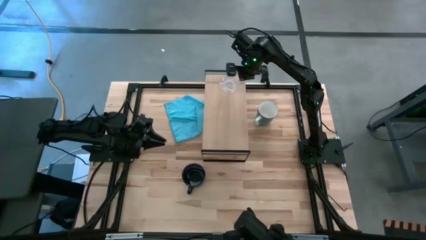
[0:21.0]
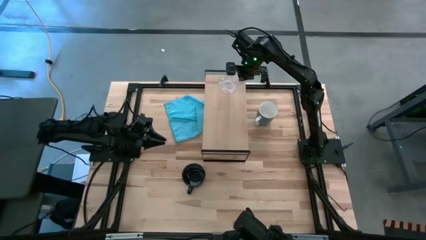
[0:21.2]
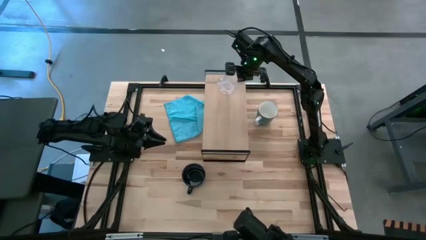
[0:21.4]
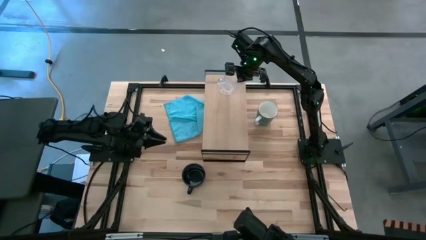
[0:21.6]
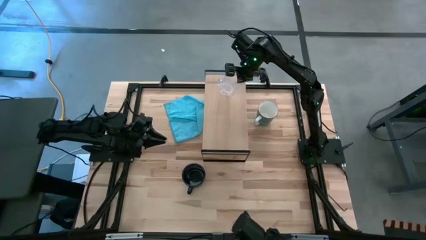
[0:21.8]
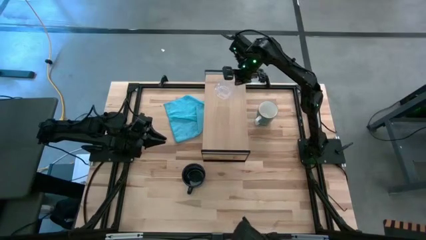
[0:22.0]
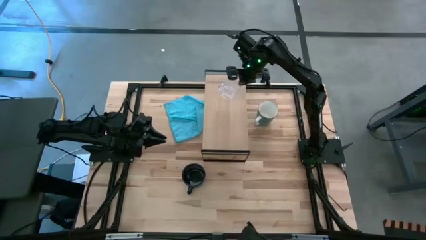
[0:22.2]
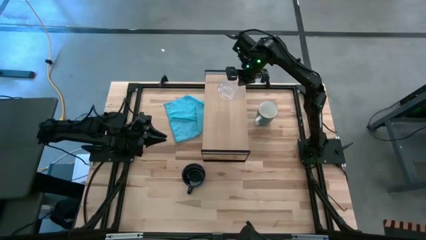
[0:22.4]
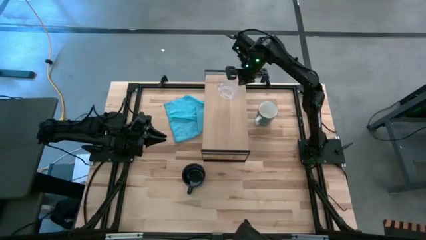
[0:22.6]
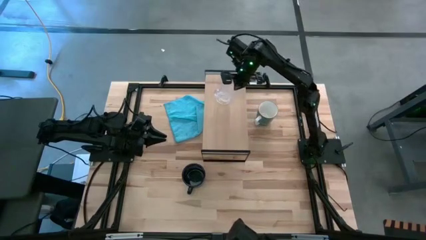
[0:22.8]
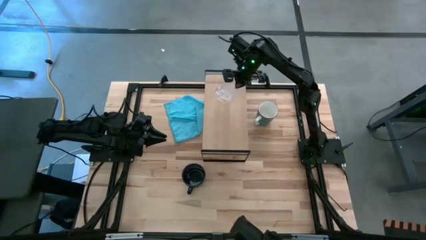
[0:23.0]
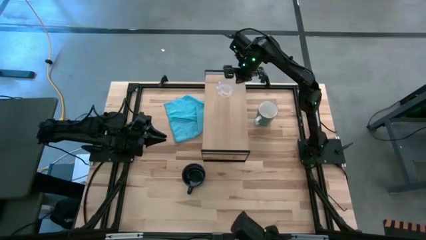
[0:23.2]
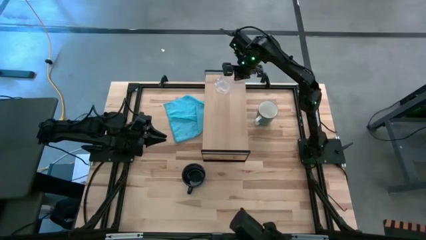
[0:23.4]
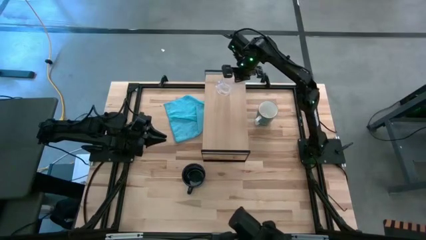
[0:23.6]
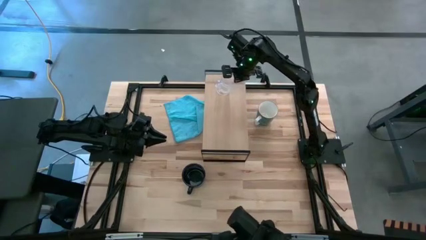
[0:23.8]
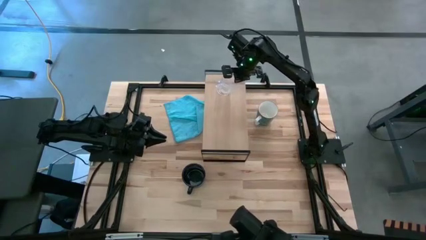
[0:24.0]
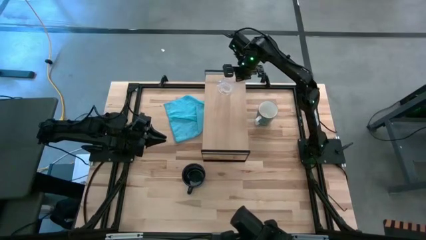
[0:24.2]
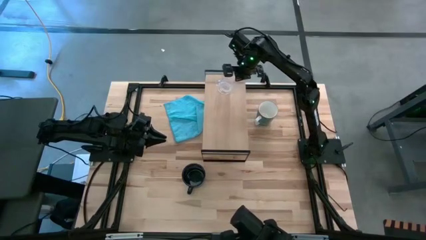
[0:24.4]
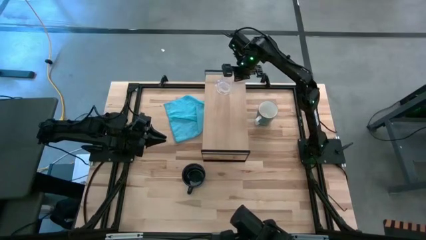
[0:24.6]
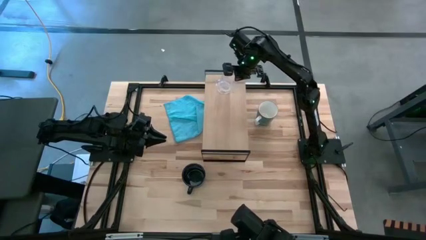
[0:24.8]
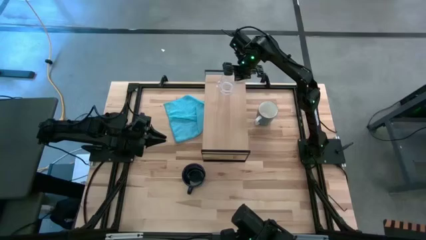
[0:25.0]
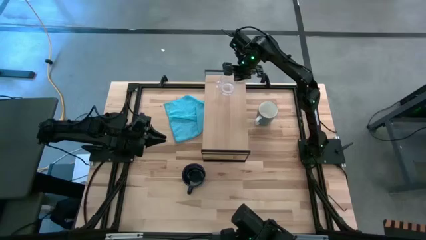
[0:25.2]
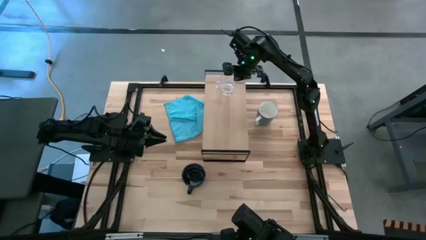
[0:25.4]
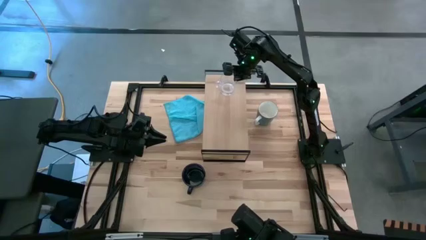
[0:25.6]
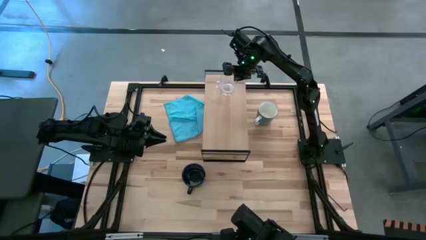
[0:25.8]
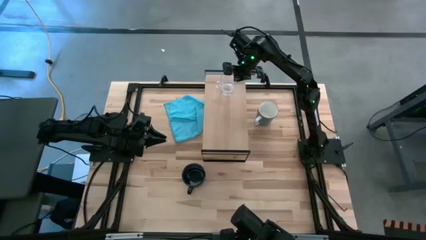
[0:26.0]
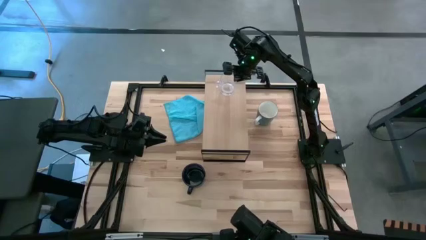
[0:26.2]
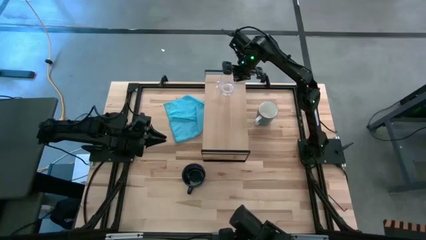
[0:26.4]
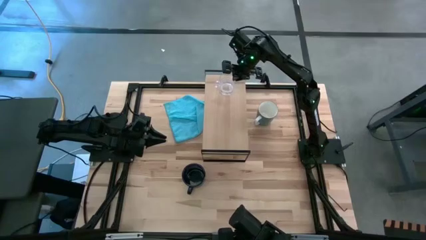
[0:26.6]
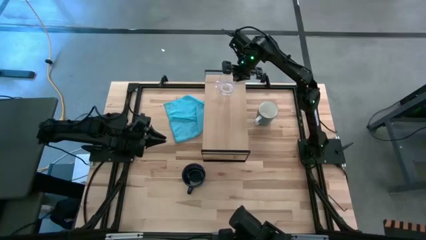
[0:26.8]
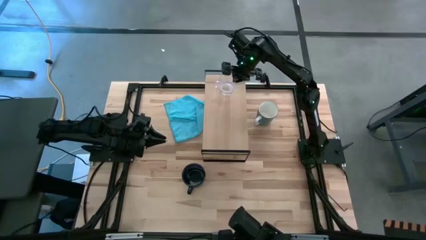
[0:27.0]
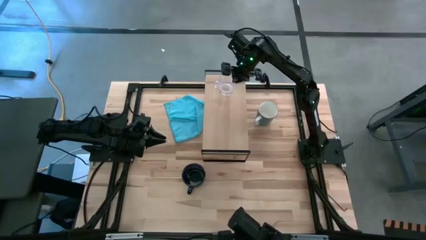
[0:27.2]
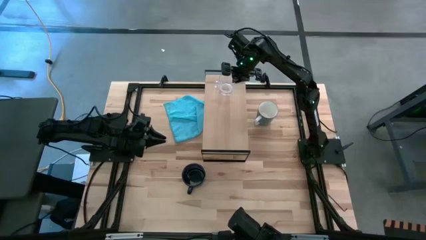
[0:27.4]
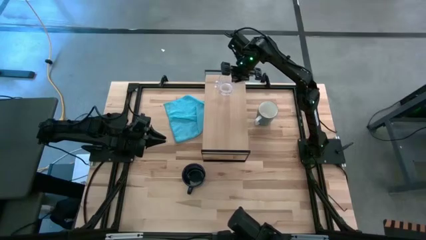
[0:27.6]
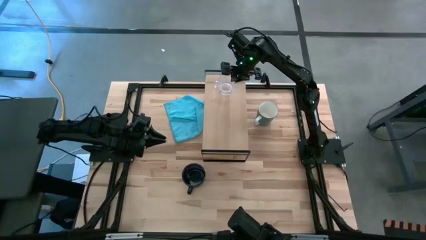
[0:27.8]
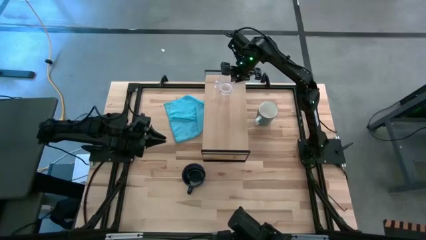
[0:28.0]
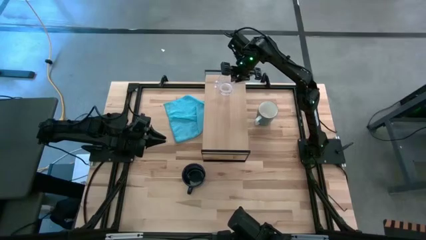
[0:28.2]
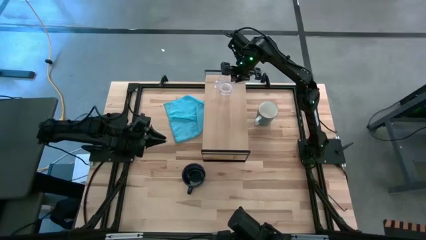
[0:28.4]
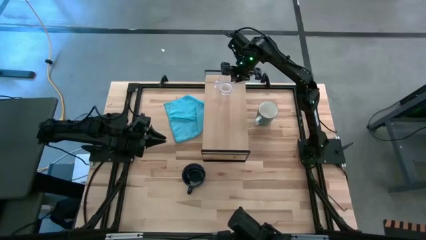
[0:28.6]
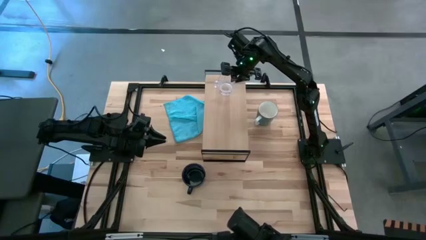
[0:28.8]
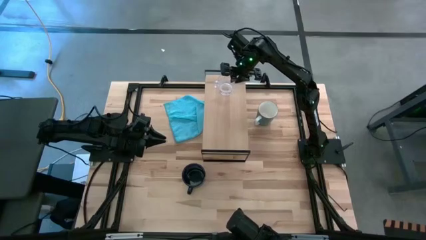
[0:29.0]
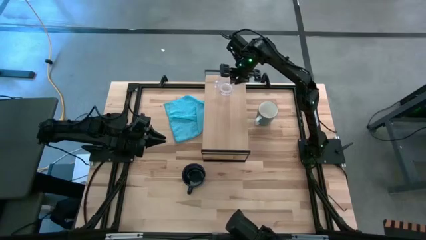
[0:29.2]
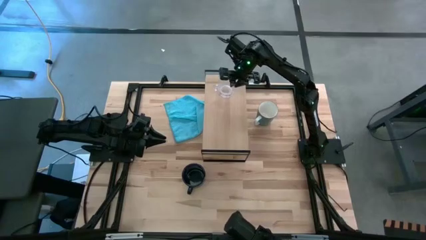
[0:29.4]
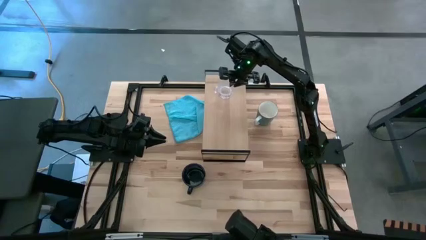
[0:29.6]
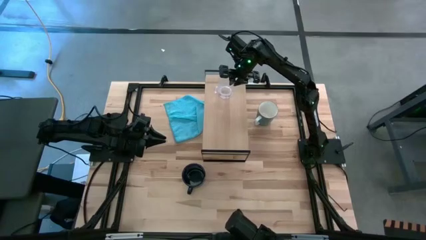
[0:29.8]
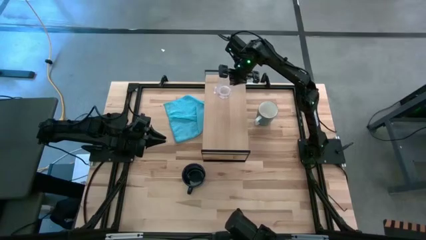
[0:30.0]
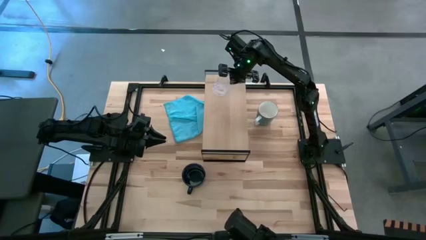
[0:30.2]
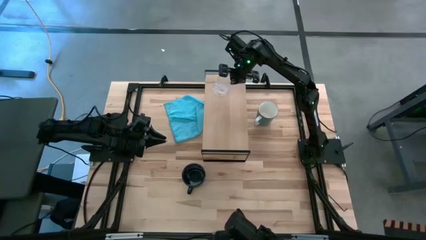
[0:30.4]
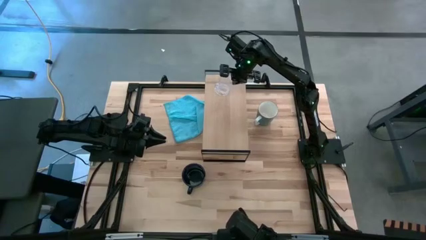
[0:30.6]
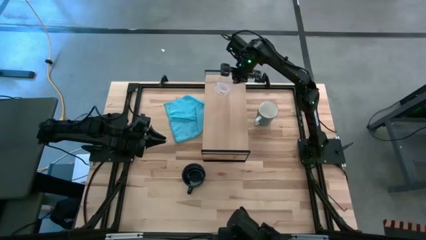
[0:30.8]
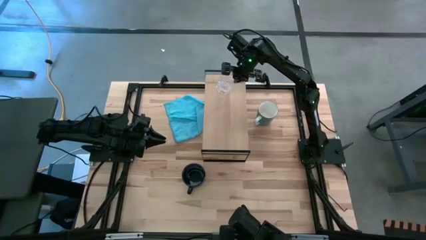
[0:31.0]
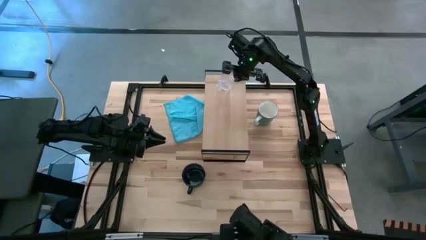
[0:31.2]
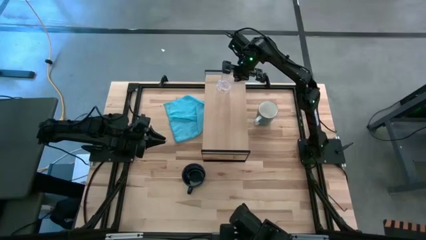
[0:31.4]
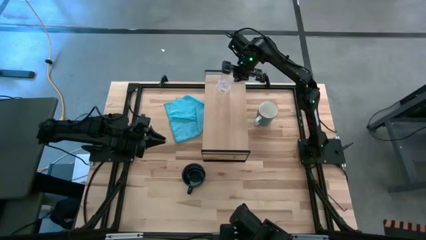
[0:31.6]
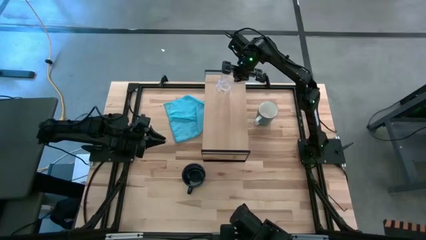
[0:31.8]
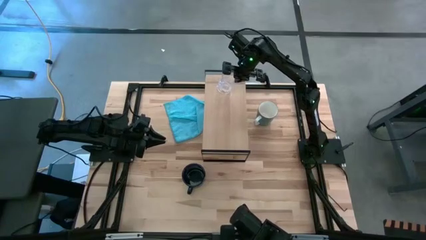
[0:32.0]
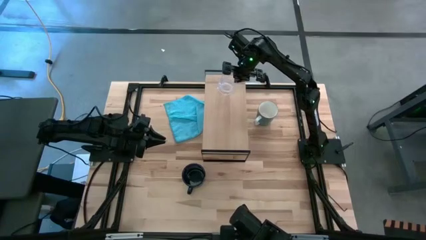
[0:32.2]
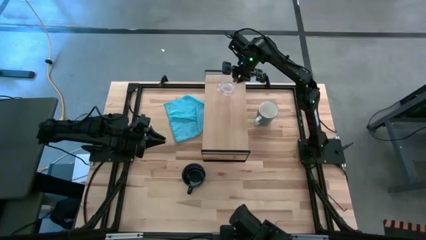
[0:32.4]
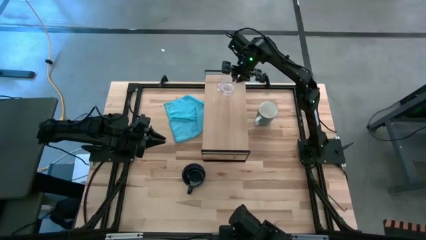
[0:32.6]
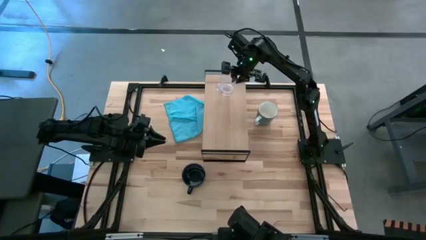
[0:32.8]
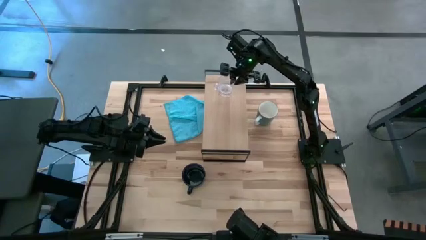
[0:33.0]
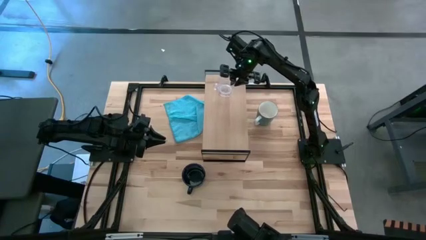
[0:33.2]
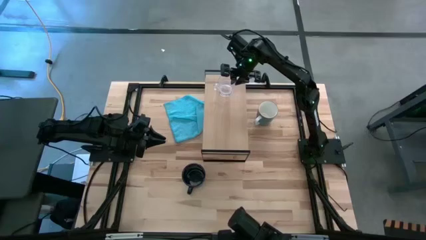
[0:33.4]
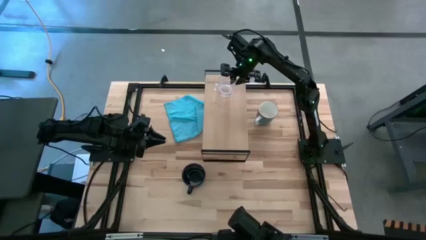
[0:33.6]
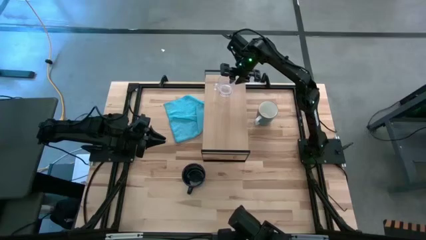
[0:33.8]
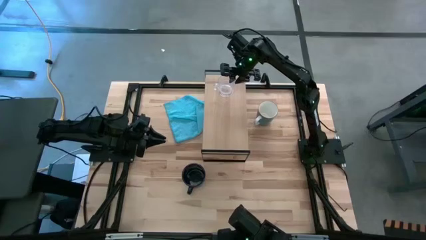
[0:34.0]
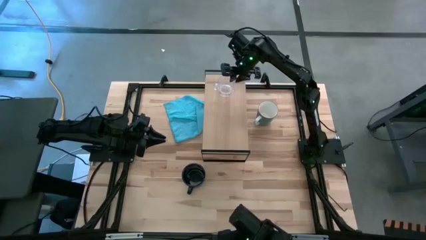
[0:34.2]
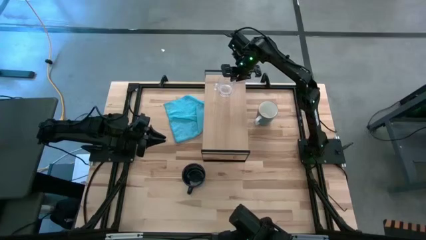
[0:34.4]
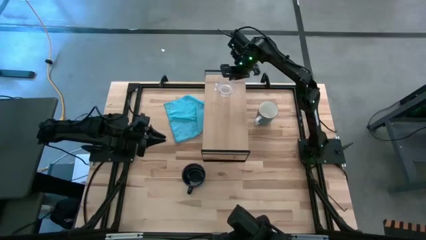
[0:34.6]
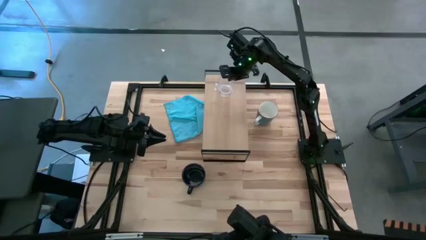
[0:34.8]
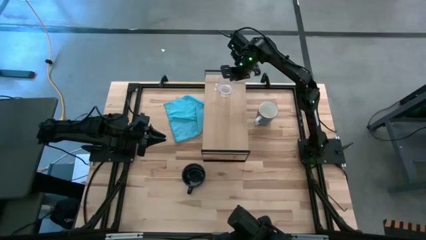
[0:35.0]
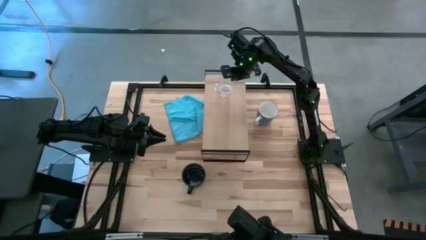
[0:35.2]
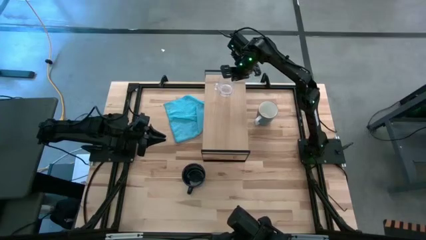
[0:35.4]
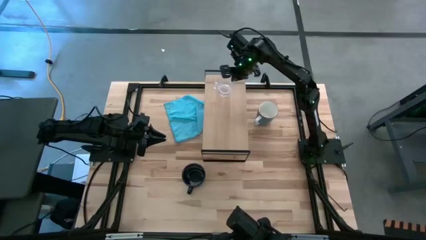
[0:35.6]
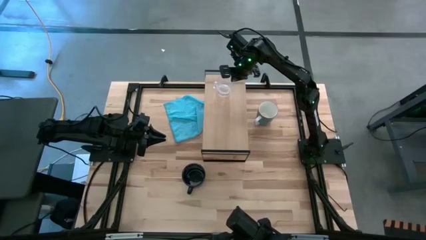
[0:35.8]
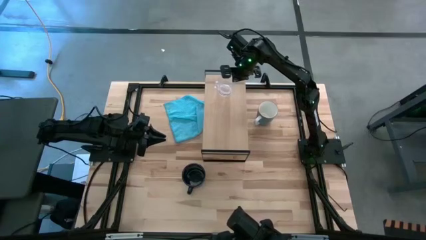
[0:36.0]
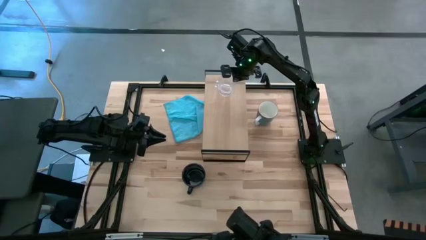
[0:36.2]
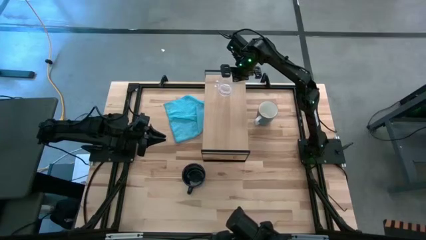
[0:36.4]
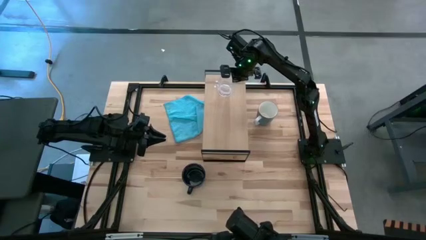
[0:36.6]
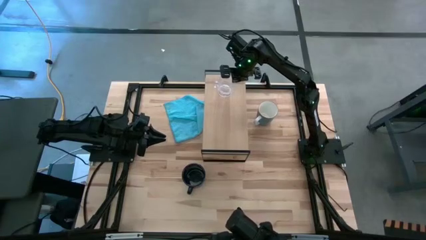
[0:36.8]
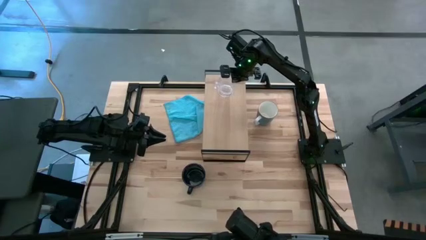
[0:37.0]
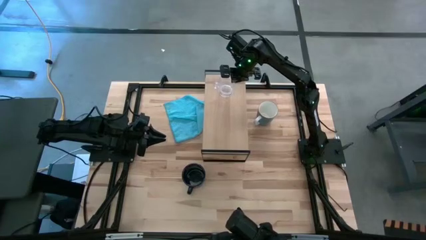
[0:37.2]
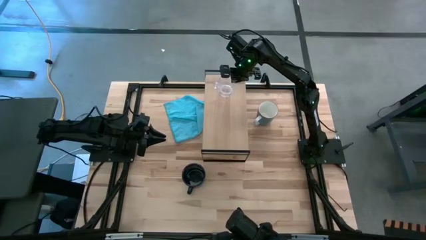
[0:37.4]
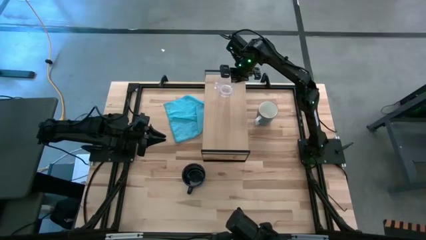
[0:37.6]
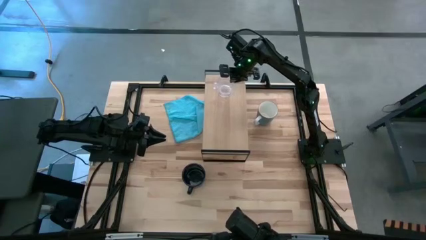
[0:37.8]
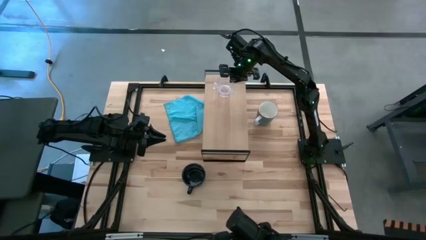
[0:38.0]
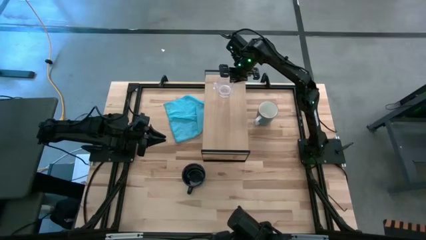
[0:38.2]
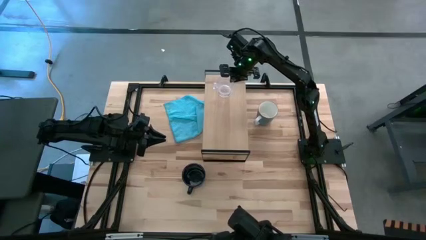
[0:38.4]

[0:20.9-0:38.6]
Task: Stack small to large cups/mugs on shelf
Put the transparent mug on the shelf
